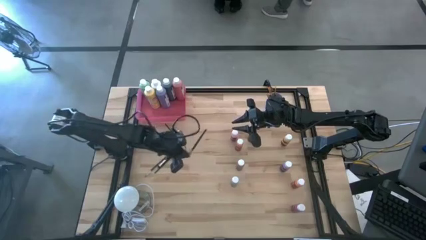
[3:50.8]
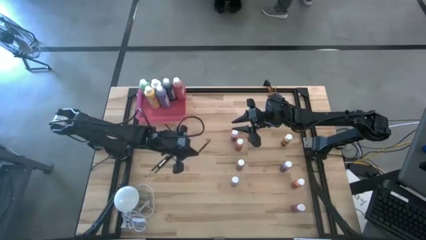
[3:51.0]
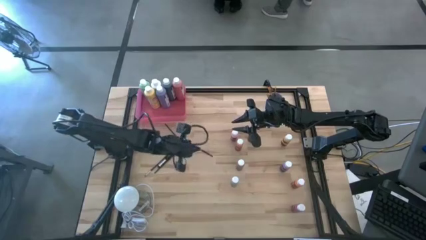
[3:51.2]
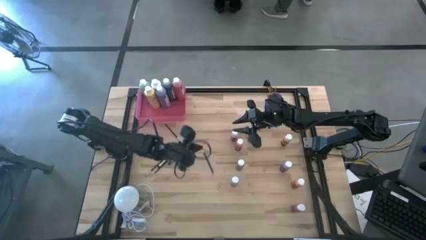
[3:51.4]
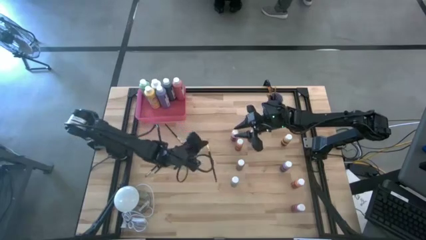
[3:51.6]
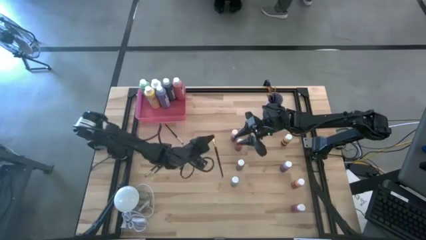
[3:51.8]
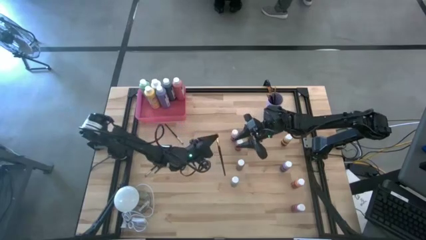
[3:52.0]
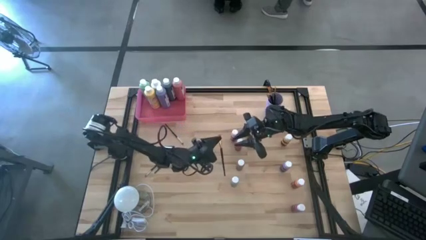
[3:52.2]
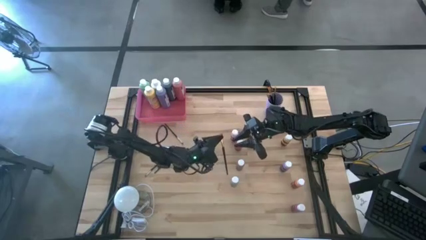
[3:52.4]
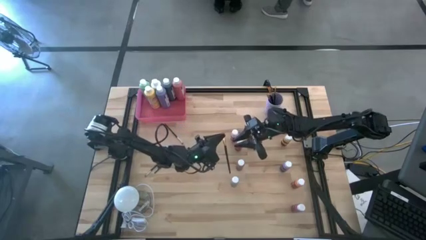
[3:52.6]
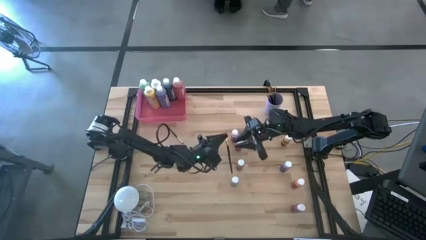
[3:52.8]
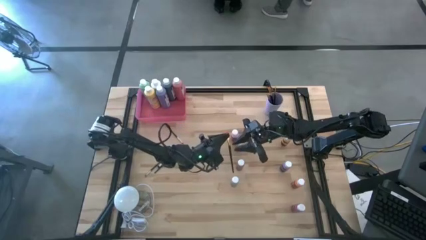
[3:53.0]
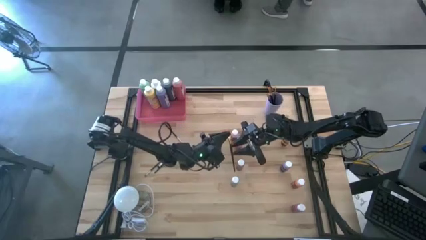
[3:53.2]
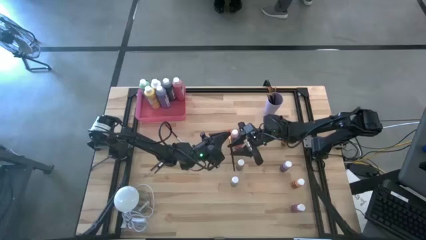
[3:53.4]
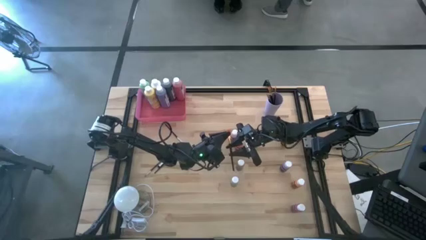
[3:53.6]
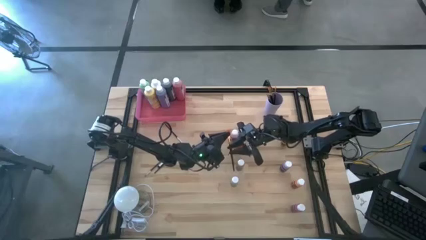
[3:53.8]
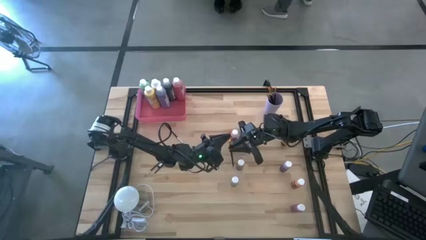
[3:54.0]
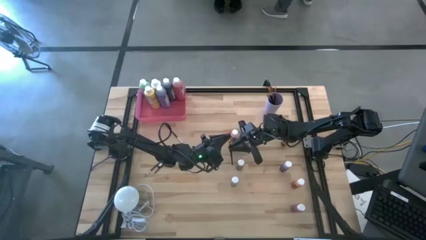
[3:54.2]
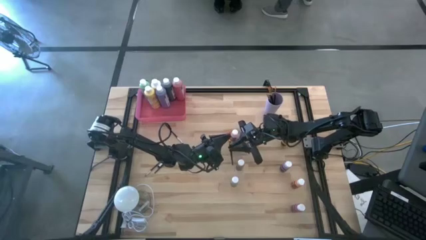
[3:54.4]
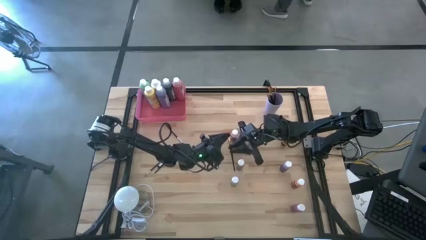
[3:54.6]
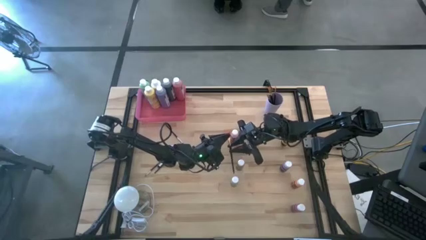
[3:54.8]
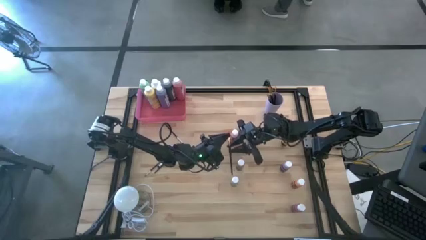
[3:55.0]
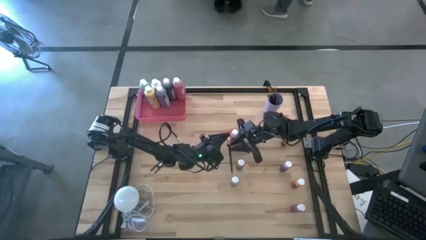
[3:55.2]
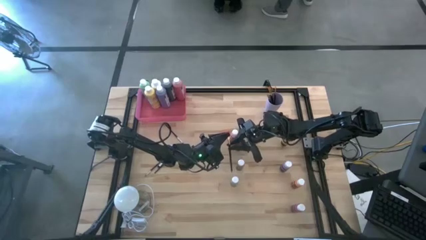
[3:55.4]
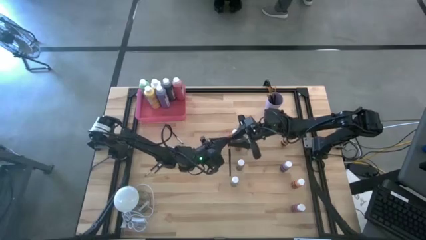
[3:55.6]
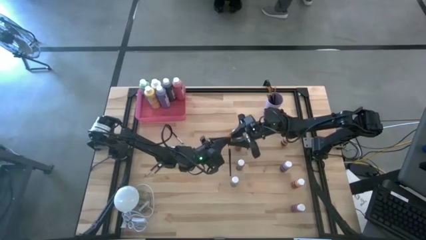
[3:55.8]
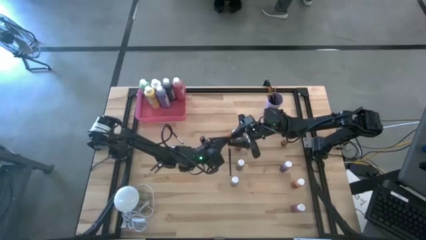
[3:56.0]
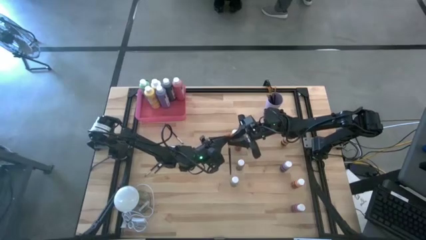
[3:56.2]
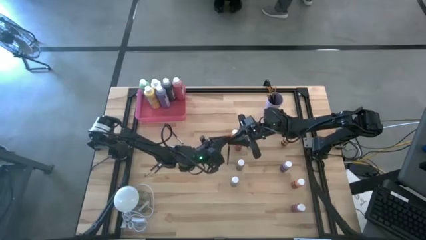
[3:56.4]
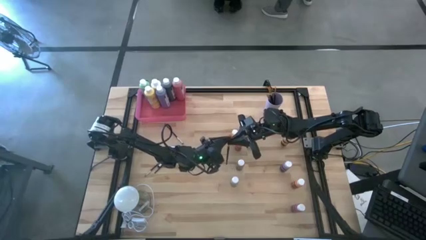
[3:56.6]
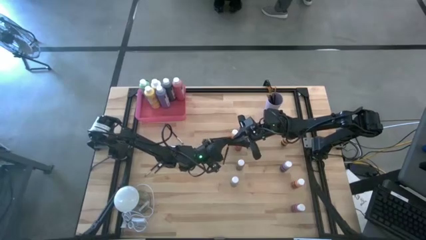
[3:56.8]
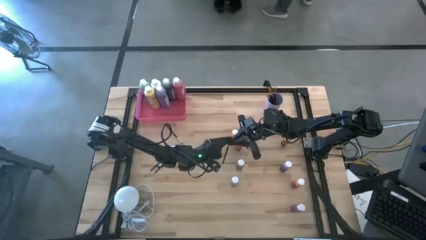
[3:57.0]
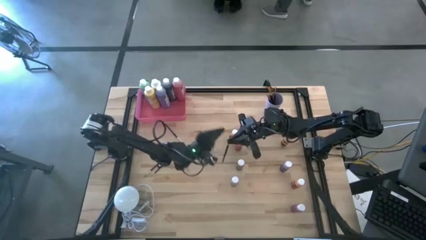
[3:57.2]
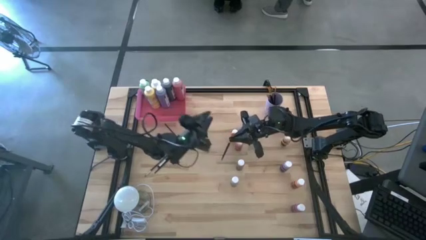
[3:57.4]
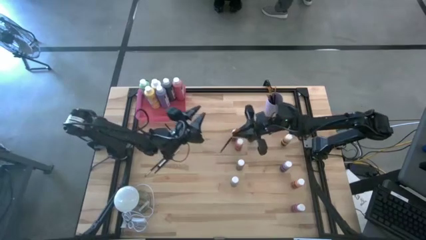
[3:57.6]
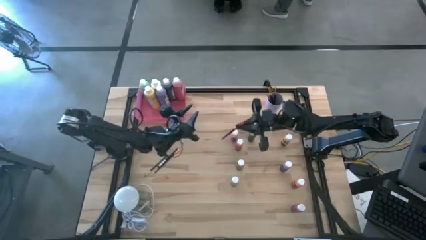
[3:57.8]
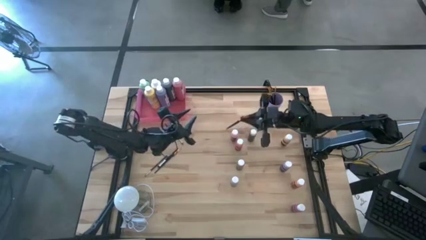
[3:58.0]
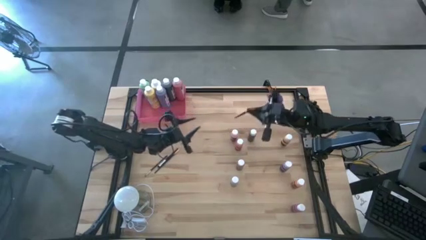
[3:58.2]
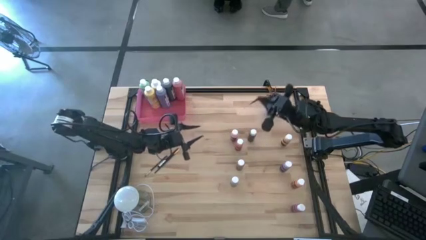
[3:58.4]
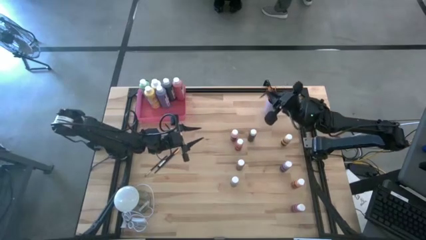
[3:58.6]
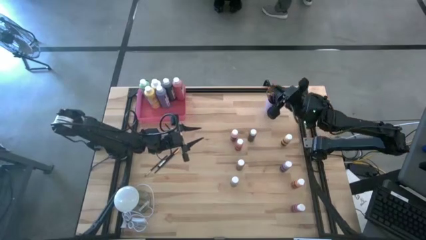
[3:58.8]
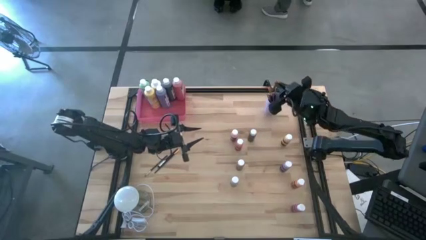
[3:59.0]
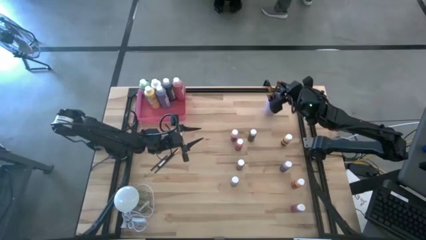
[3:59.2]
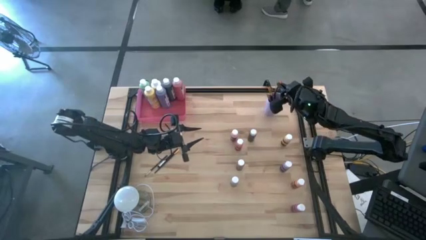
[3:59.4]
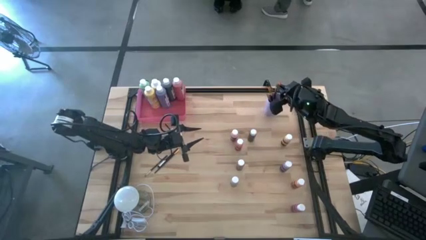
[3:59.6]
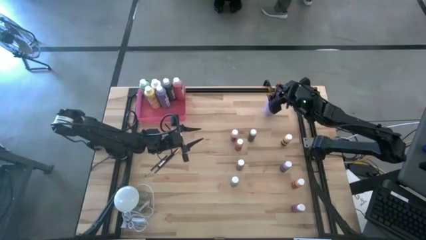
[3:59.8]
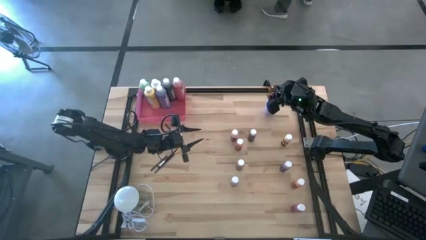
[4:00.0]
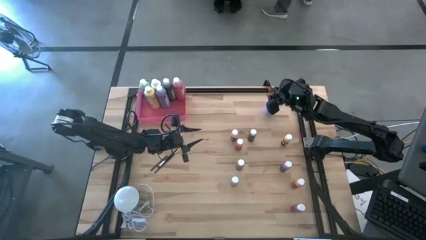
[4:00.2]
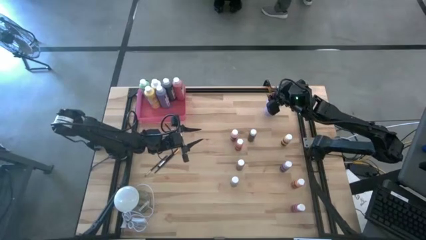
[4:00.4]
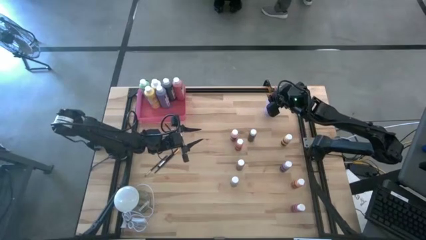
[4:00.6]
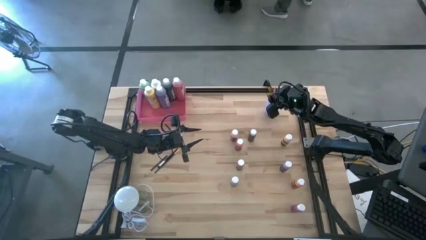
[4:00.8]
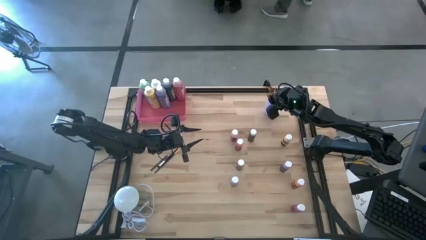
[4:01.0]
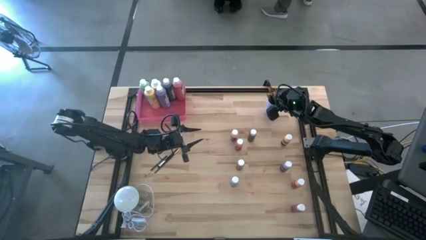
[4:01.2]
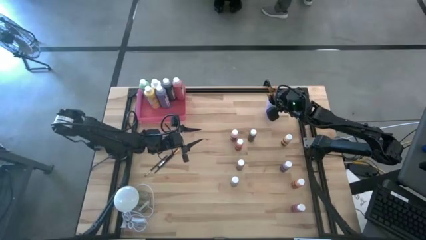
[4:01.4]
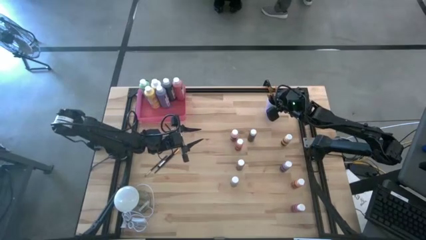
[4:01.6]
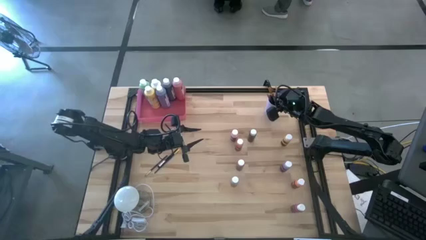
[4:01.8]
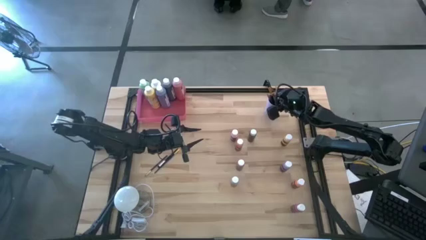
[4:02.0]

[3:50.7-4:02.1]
Task: Pick & Place Paint Supplies
Put the gold paint brush into the purple cup

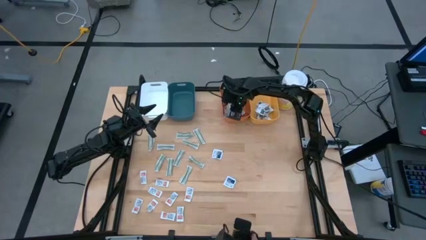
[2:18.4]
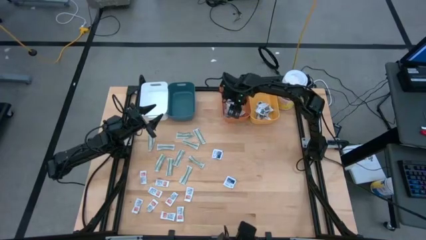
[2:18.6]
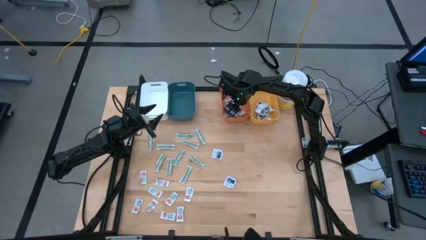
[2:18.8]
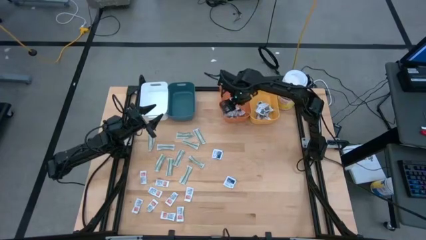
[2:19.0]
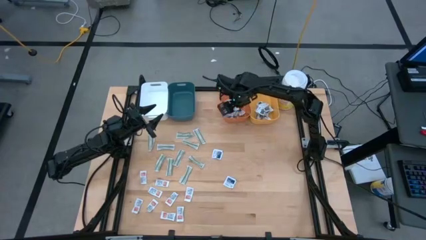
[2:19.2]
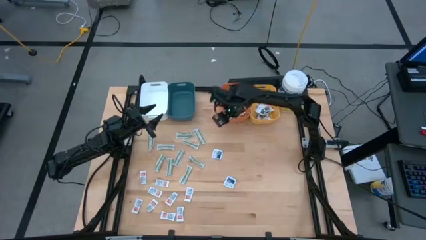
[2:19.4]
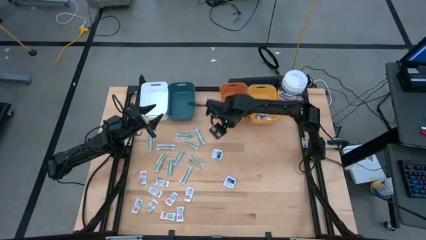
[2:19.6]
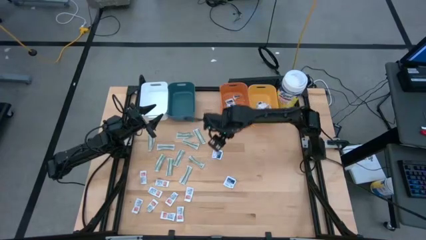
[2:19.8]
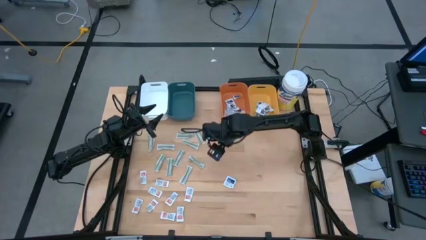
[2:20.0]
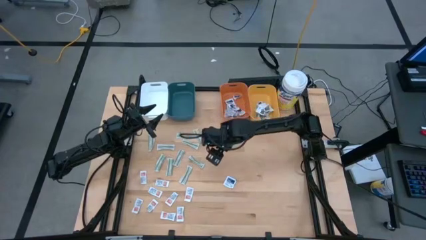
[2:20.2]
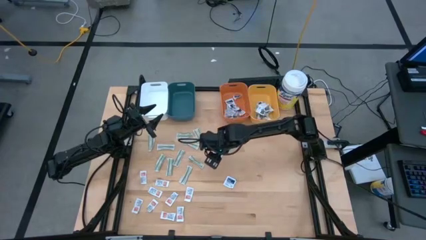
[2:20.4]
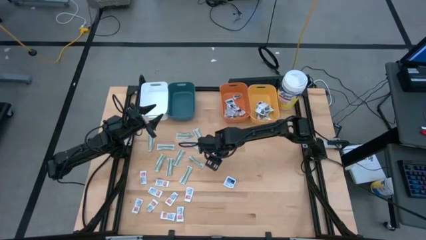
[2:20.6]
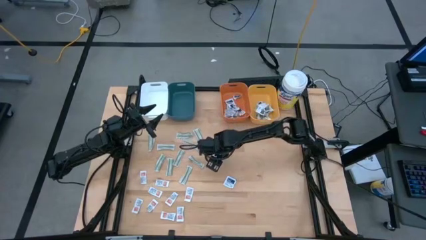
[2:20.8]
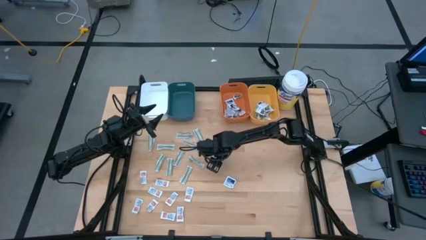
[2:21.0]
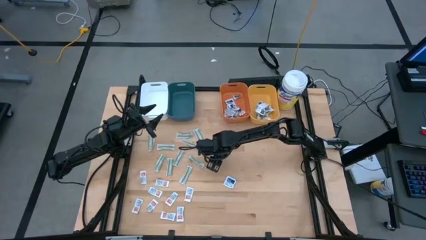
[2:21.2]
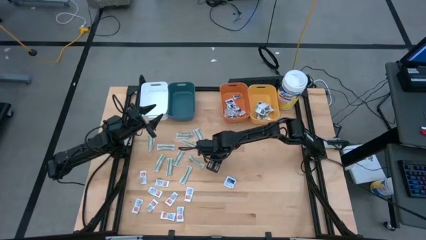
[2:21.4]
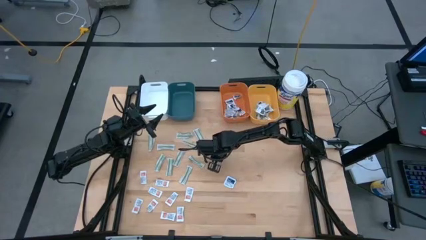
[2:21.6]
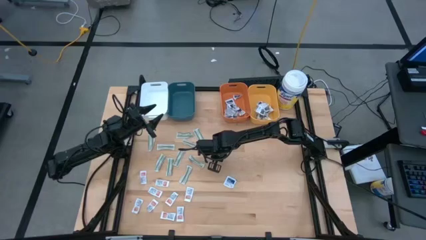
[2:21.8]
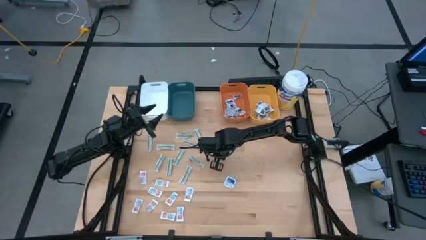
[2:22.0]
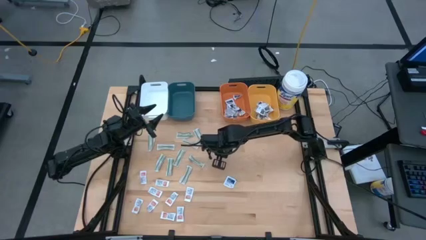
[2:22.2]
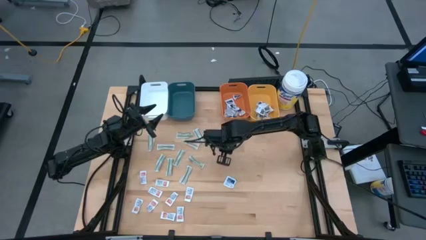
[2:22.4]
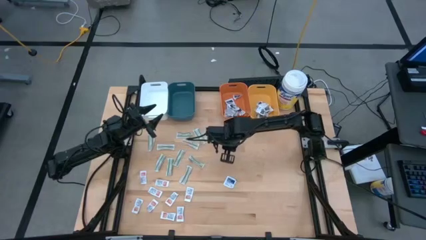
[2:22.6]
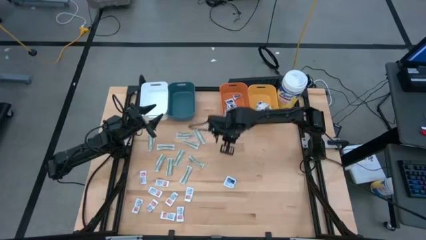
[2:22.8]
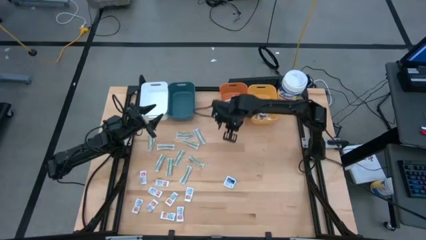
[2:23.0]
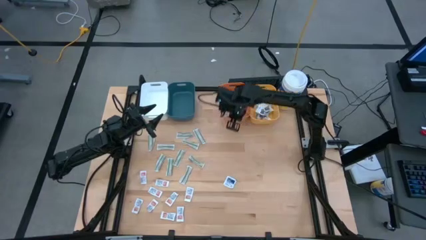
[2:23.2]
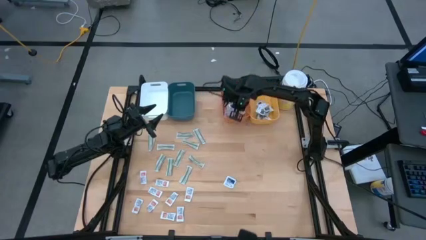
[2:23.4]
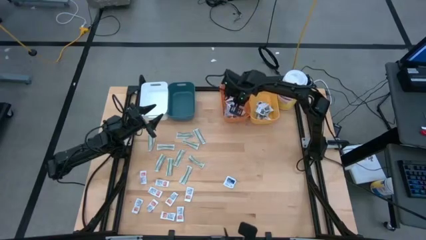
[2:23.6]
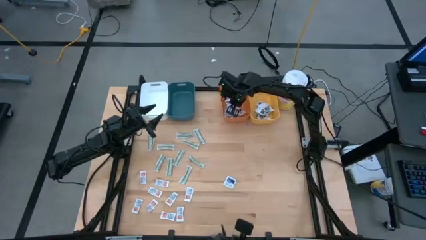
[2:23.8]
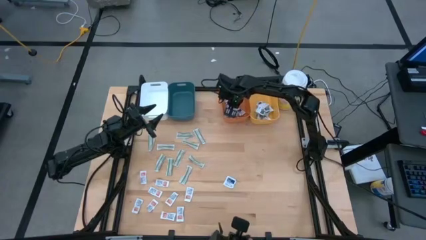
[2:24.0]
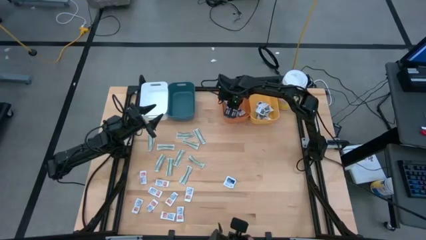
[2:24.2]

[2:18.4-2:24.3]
Task: Pick & Place First Aid Supplies
Put the alcohol pad into the orange bin
